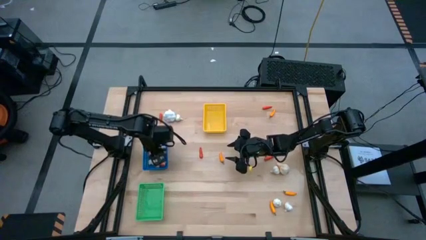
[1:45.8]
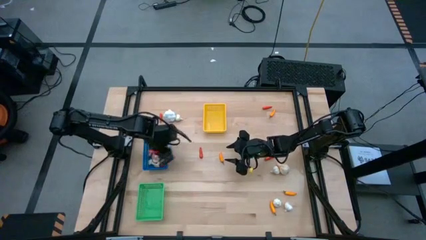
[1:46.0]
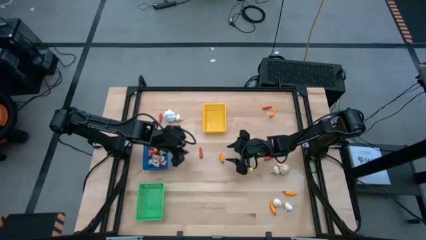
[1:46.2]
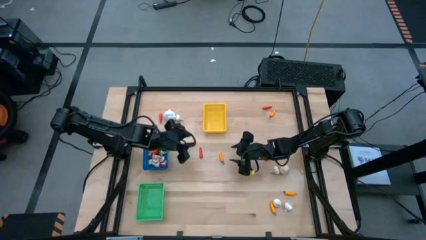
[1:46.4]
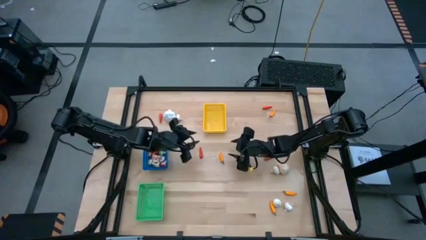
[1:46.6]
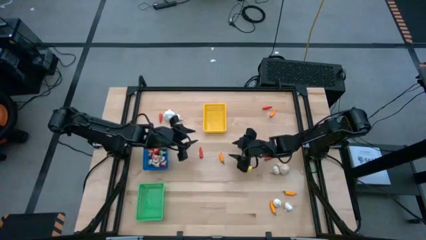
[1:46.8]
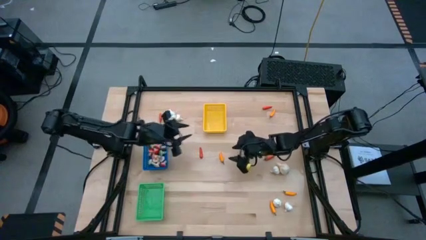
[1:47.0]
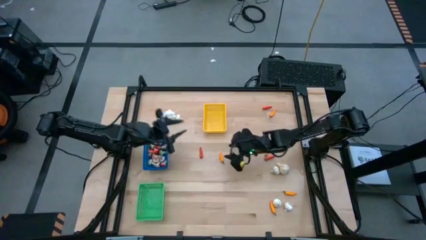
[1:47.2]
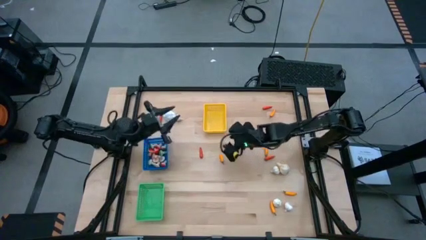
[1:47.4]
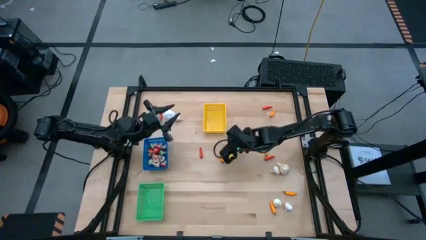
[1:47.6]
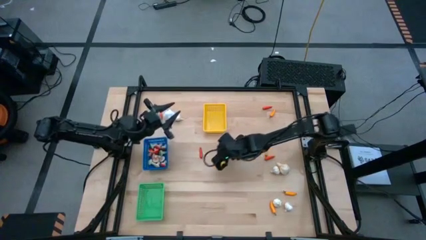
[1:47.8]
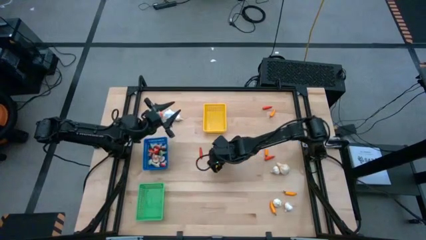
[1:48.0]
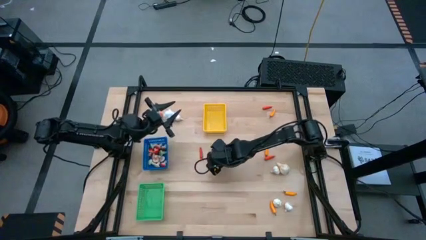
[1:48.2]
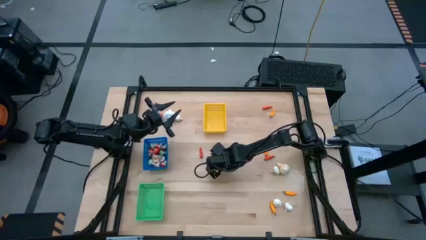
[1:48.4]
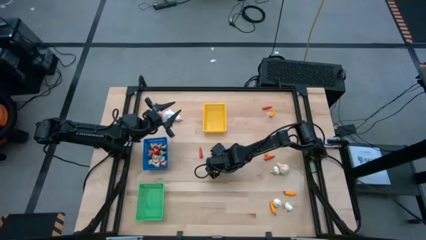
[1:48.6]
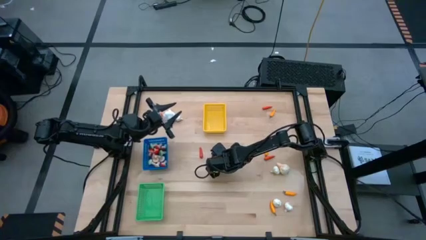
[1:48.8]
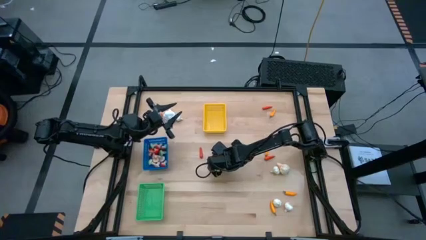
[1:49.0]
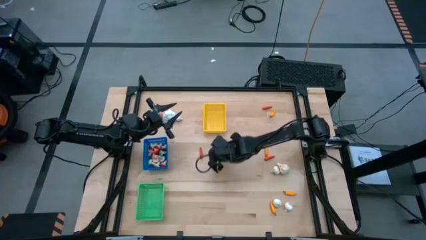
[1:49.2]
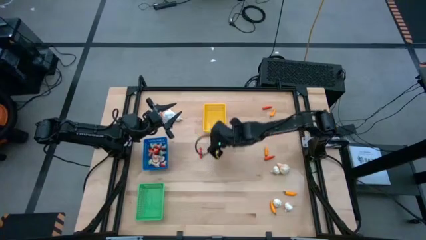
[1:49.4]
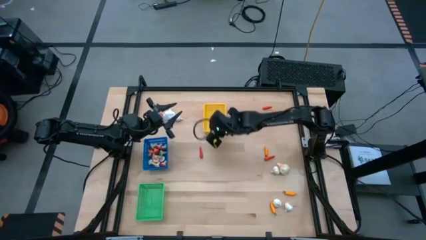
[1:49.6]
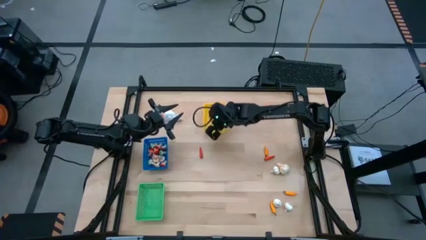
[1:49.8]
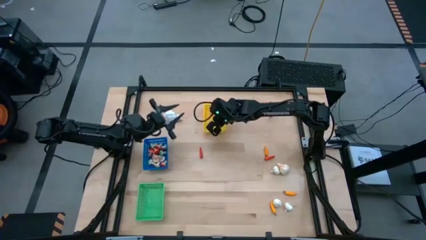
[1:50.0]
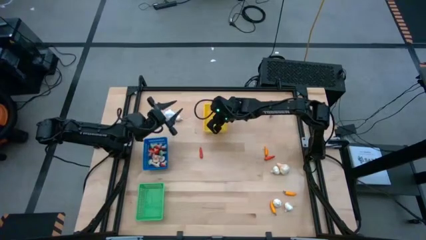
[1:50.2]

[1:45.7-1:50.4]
Task: Sort produce into baskets
Put the yellow chili pepper into the yellow bin

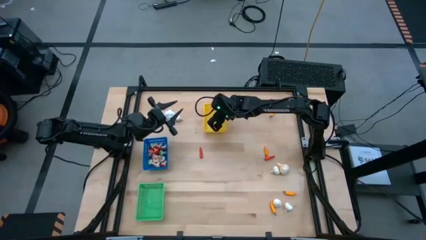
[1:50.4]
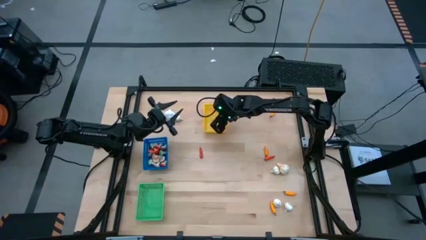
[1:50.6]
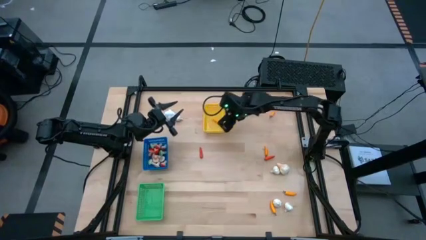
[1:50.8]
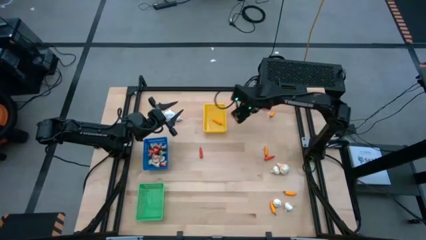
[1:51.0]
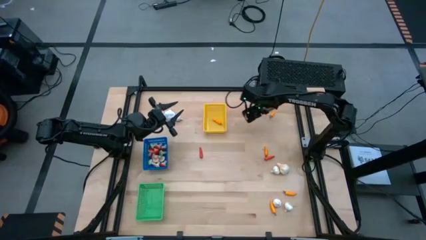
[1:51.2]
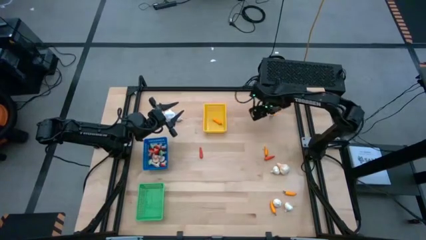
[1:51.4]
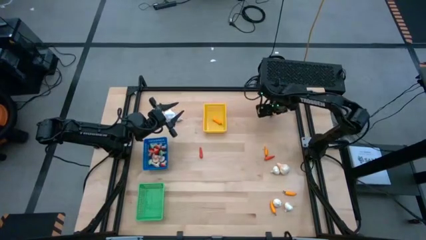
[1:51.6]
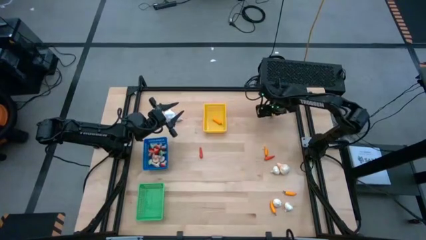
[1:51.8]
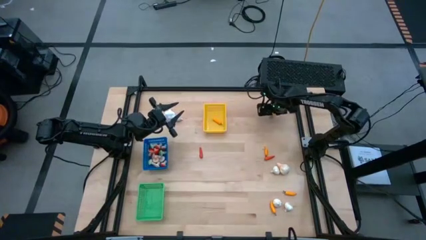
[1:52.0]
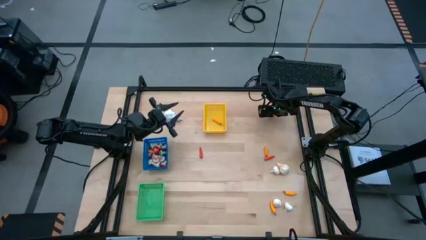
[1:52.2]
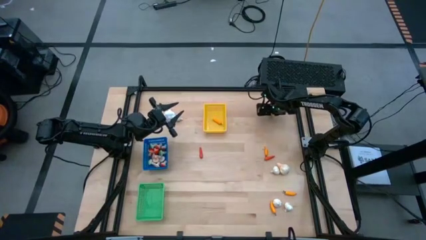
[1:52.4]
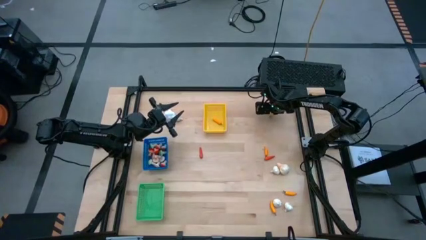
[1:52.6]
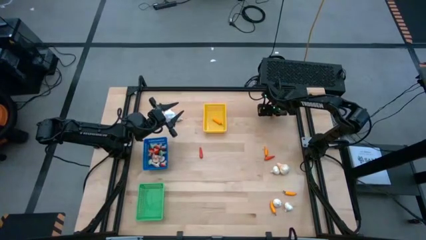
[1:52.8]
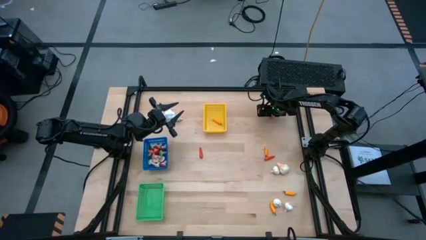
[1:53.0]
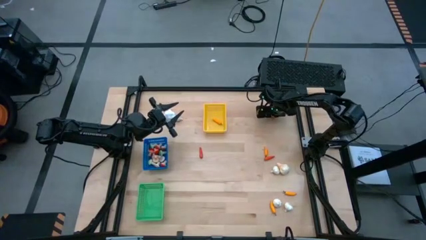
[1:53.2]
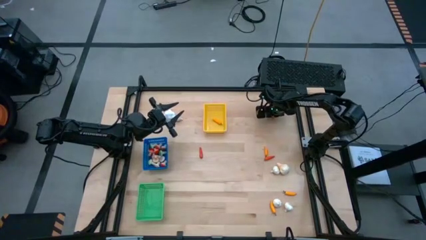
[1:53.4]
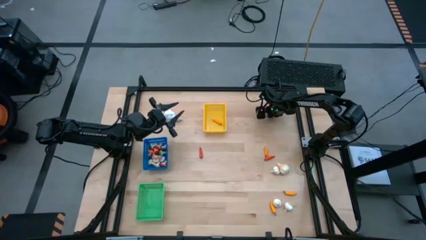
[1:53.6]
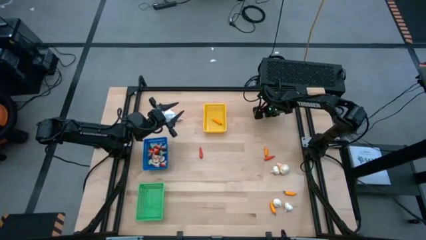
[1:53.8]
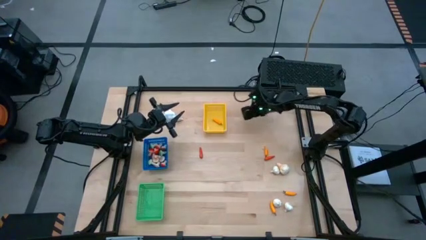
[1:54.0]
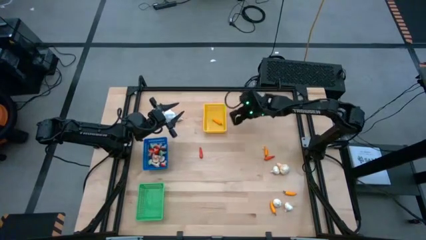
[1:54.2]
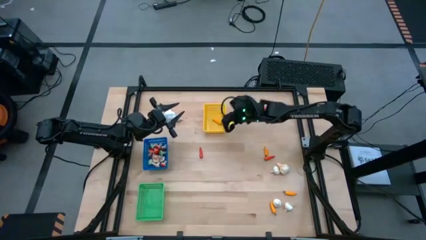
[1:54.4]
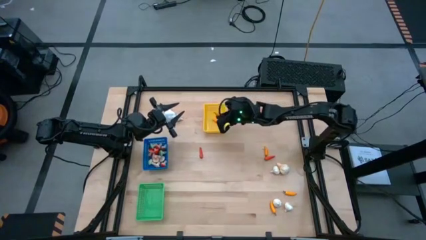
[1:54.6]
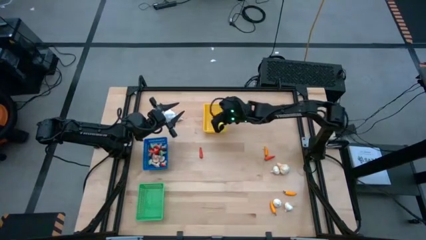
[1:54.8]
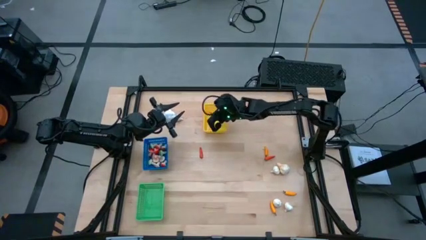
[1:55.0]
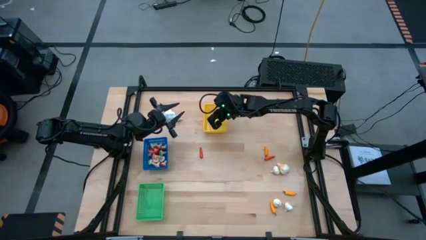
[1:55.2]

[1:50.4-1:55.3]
Put the yellow chili pepper into the yellow bin

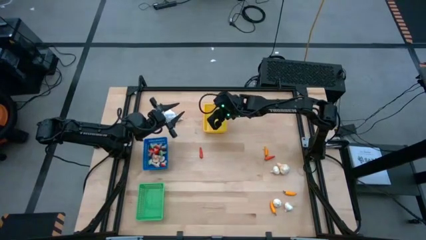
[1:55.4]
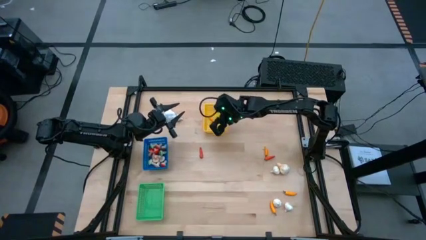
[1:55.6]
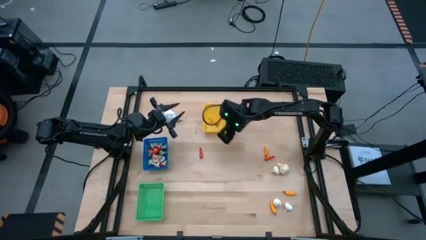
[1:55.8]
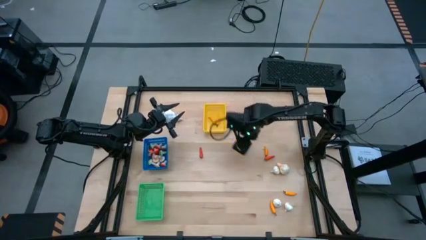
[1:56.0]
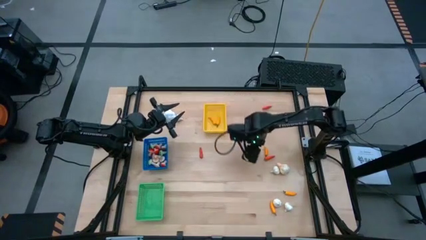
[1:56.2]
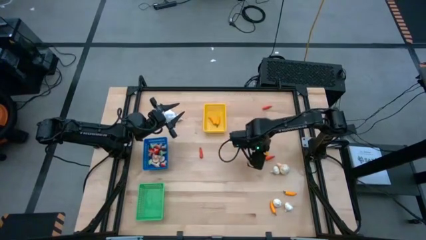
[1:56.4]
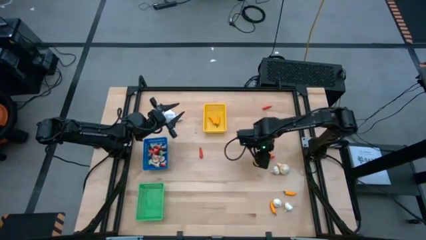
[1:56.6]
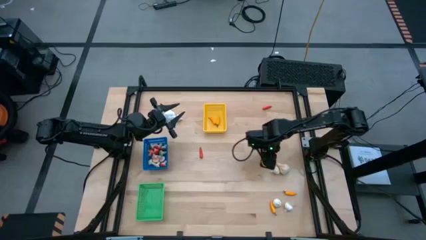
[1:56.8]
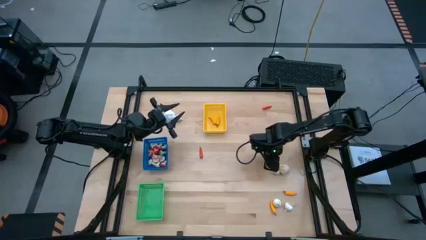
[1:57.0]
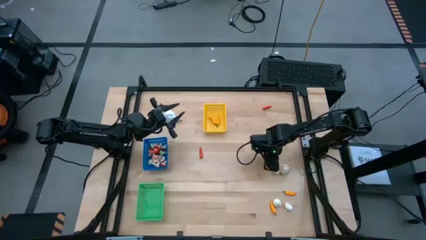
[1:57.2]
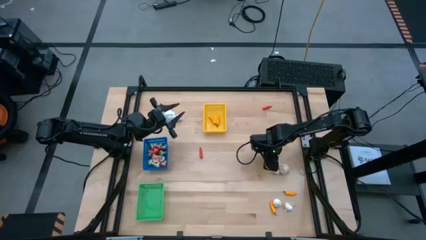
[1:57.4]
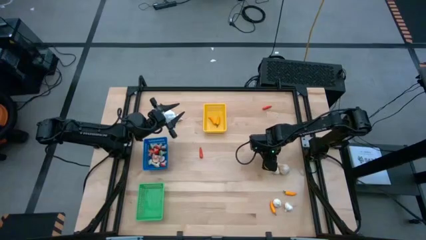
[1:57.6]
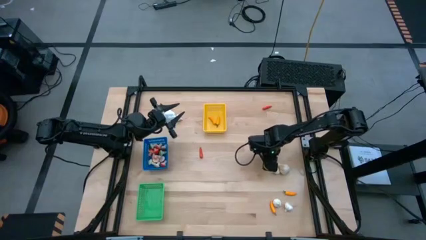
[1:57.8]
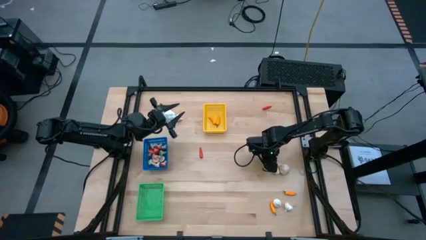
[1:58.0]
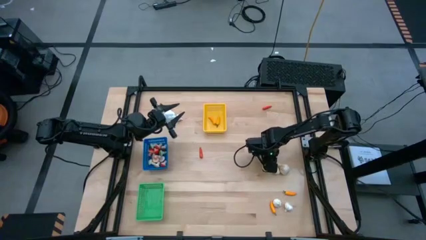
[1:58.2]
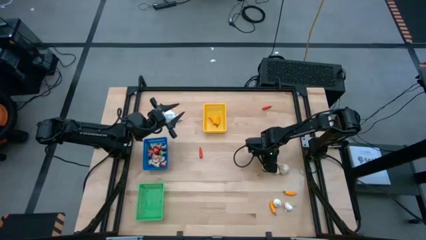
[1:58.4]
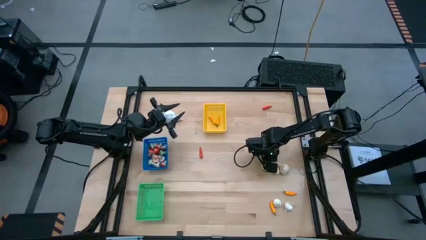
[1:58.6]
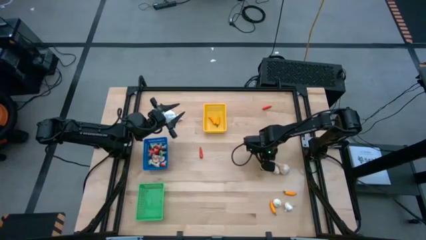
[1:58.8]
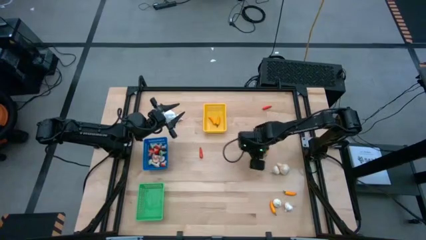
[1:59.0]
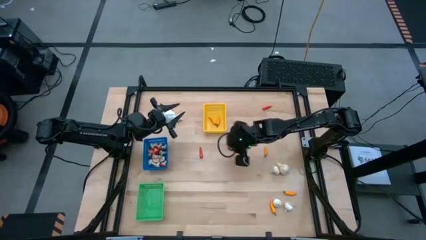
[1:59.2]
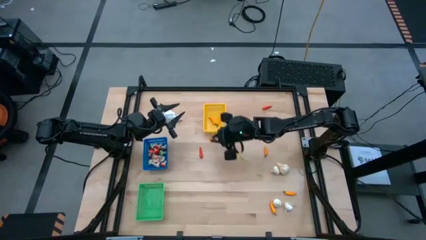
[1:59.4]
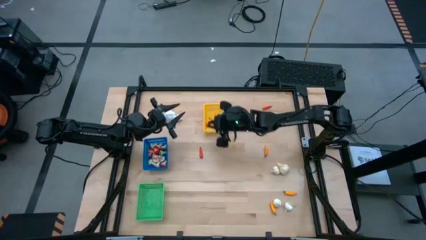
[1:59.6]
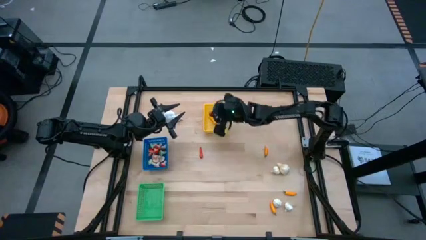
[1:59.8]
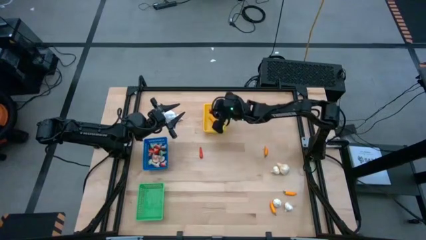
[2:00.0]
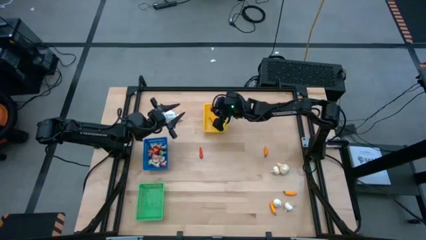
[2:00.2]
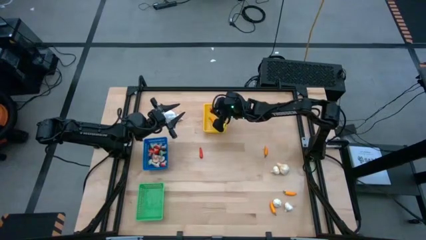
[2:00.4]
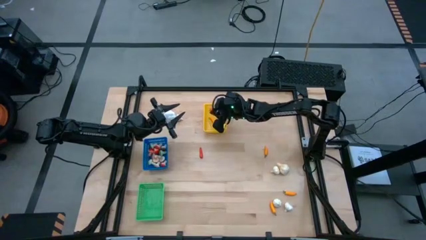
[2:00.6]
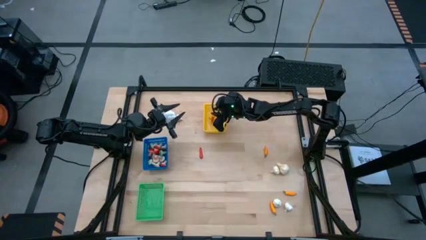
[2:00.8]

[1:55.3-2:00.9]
Put the orange chili pepper into the yellow bin

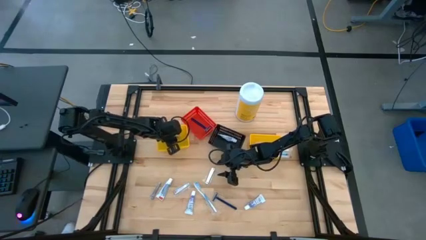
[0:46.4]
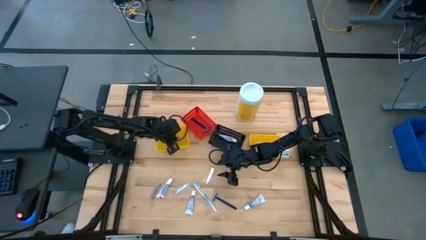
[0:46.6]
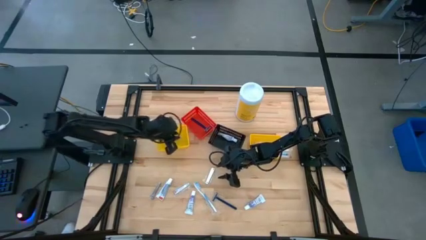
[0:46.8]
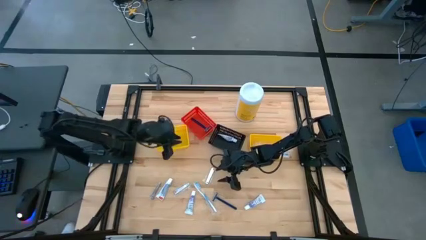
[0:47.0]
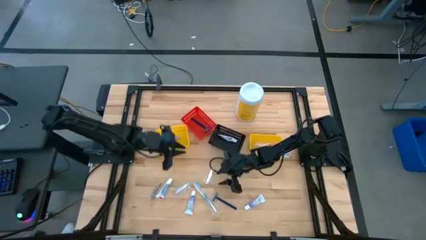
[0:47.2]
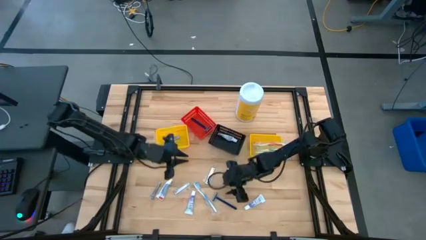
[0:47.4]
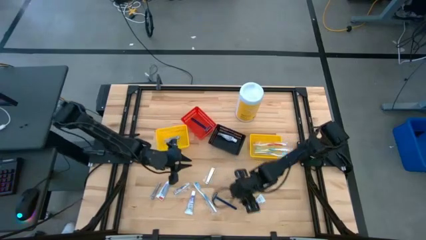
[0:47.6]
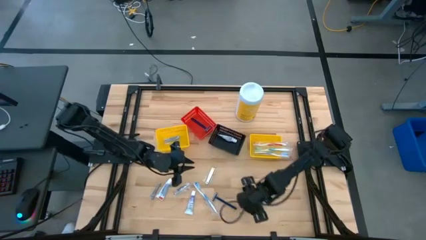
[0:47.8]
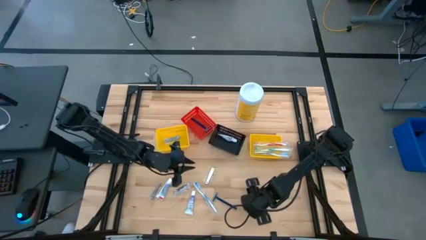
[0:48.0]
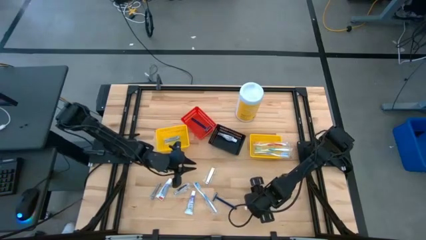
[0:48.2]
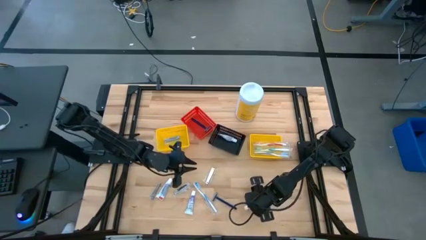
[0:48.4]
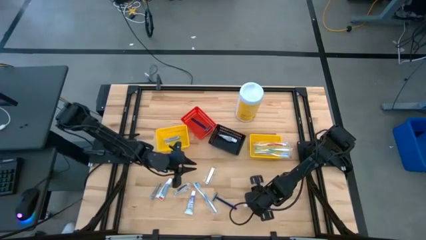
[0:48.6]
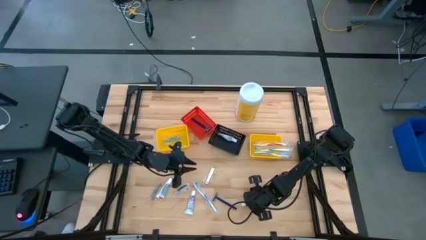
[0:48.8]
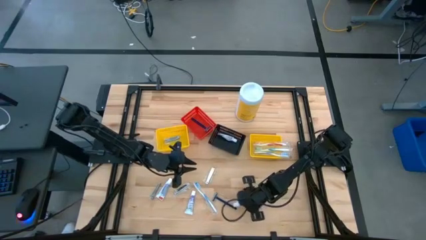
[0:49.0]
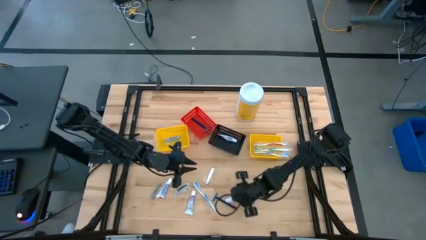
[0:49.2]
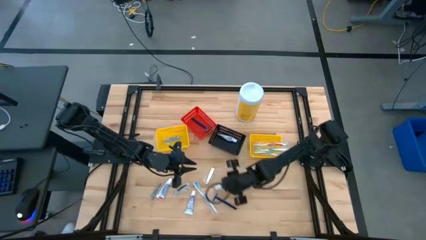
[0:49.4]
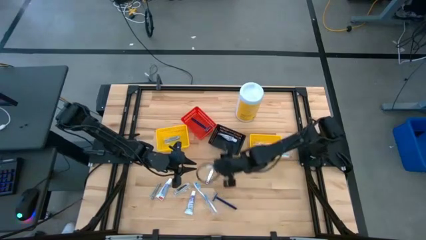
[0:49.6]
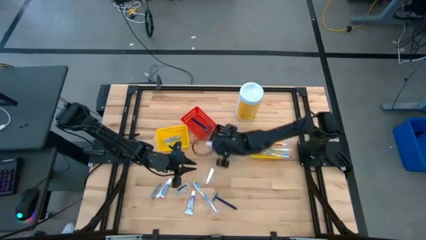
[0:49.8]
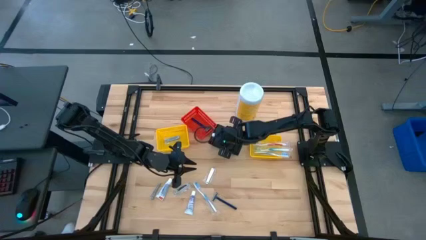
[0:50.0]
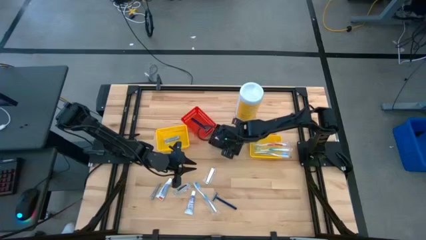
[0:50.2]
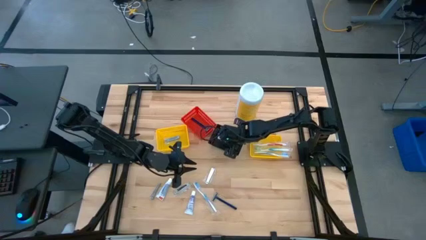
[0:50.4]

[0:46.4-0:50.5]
Task: Pick & Place Travel size toiletries
Put the toothpaste into the black bin
